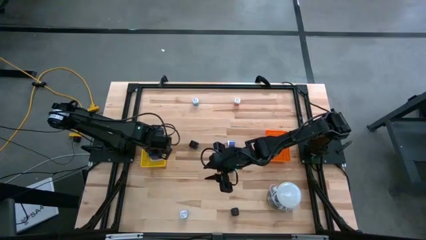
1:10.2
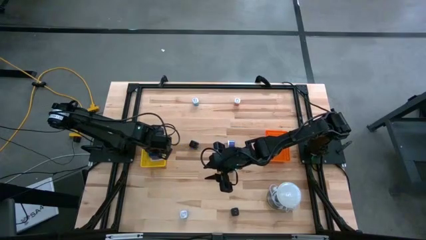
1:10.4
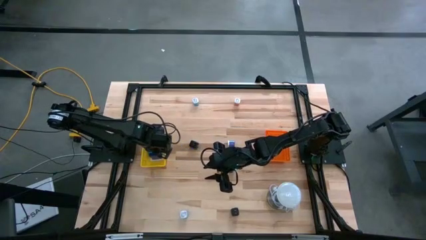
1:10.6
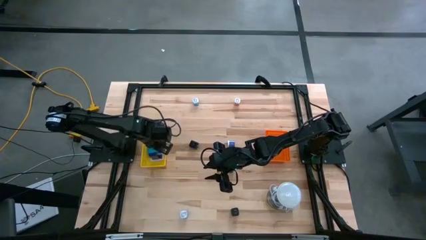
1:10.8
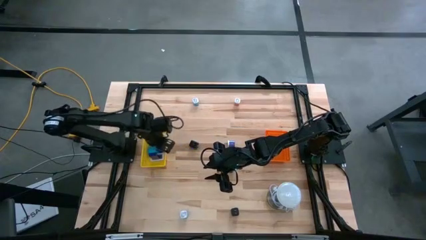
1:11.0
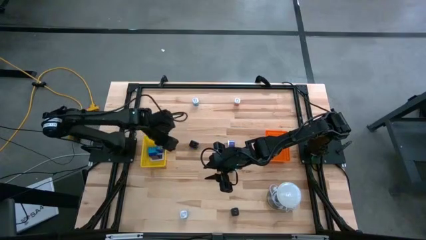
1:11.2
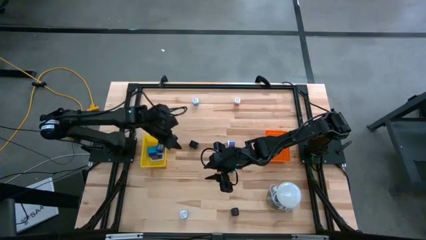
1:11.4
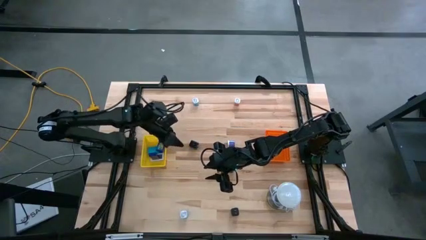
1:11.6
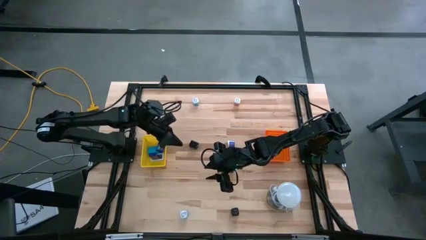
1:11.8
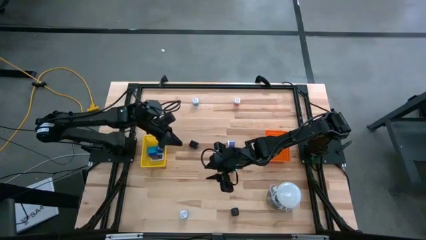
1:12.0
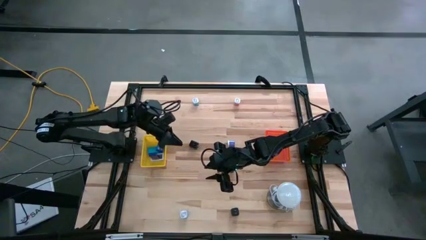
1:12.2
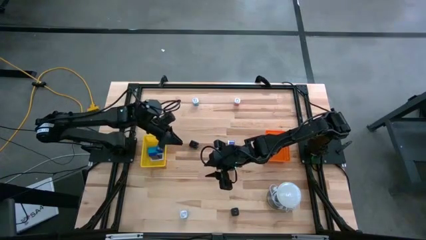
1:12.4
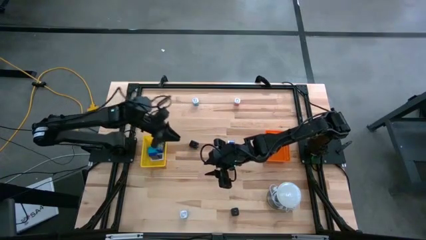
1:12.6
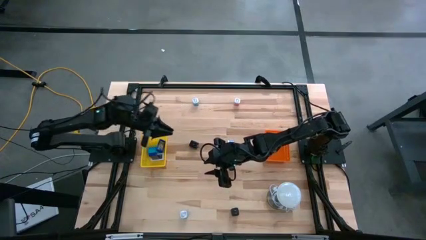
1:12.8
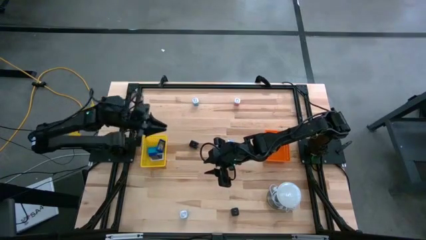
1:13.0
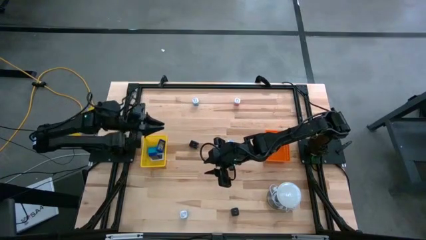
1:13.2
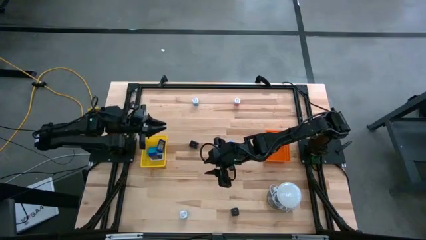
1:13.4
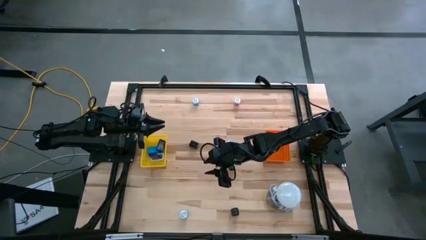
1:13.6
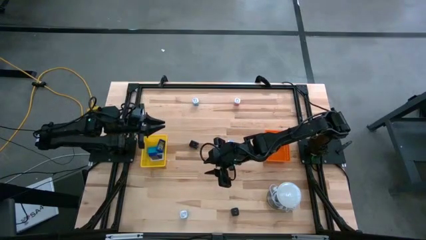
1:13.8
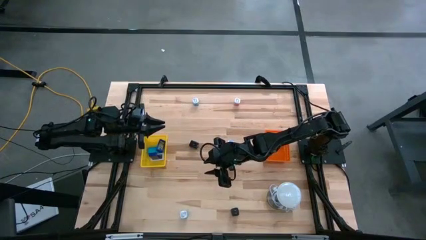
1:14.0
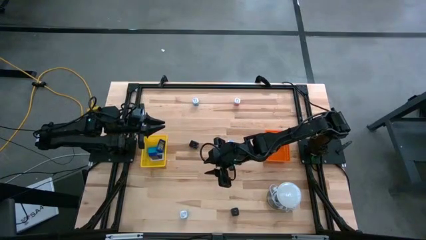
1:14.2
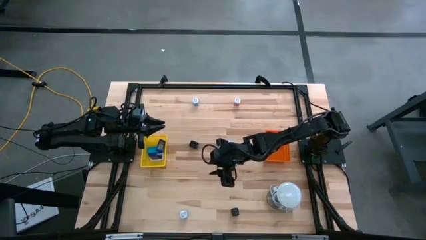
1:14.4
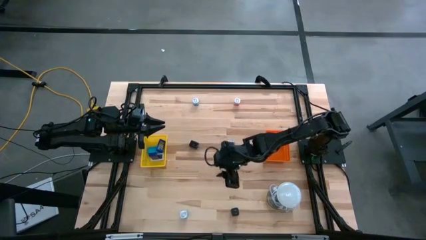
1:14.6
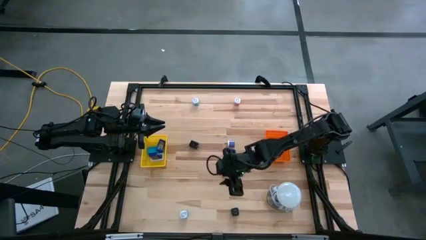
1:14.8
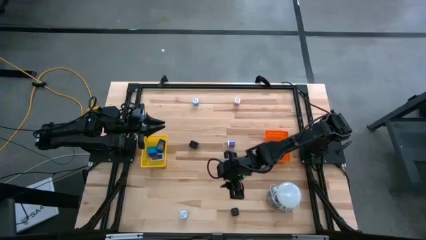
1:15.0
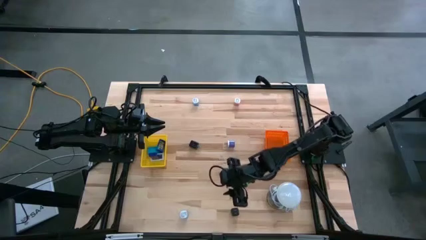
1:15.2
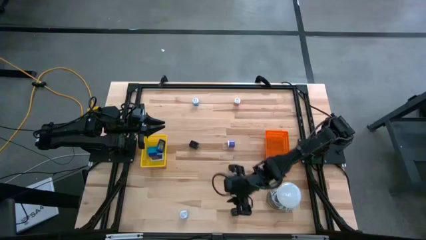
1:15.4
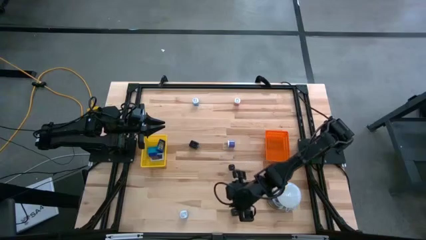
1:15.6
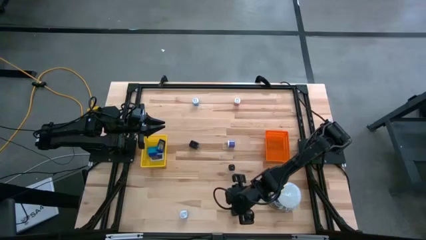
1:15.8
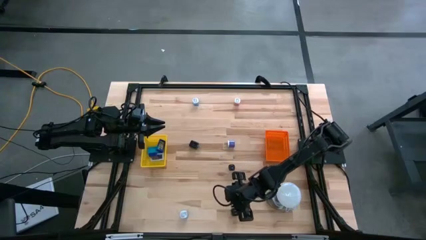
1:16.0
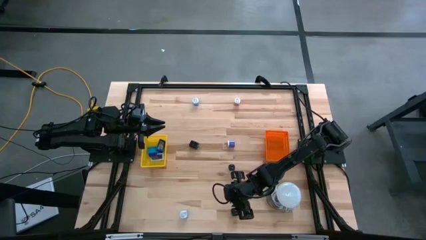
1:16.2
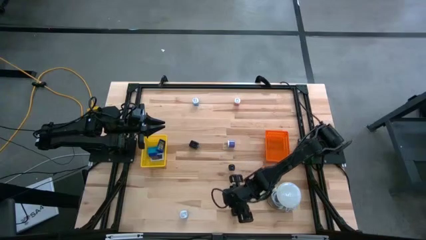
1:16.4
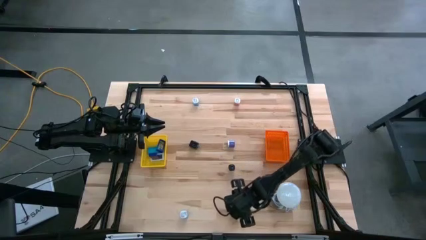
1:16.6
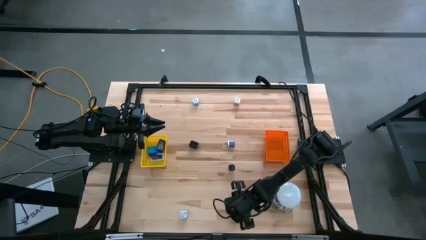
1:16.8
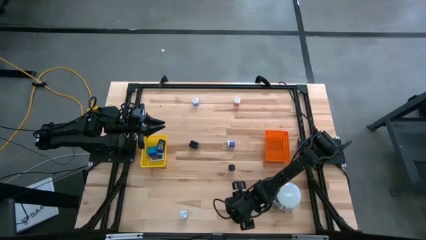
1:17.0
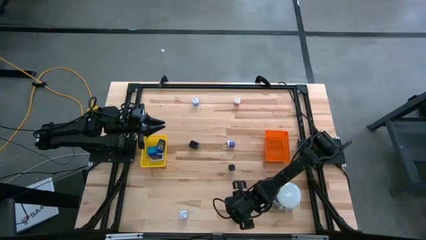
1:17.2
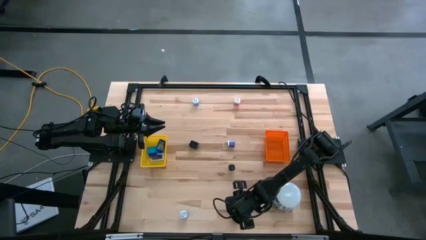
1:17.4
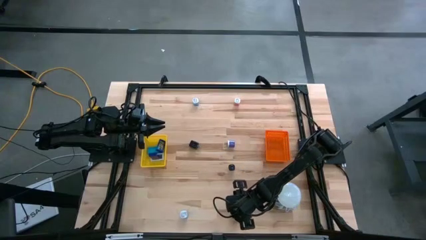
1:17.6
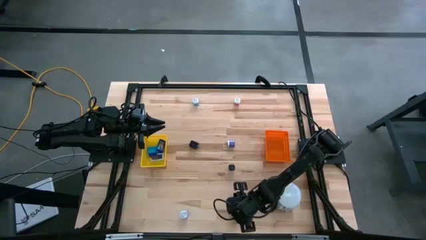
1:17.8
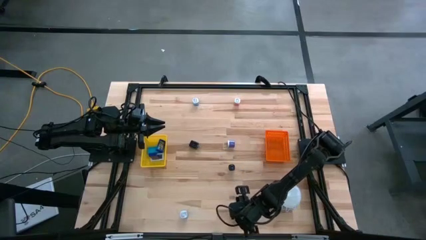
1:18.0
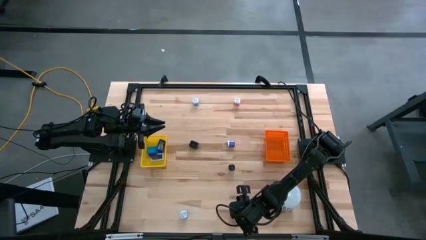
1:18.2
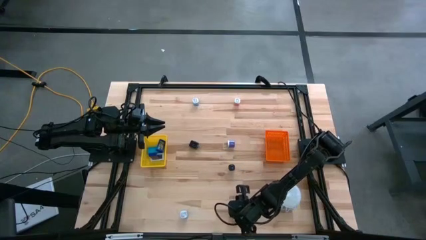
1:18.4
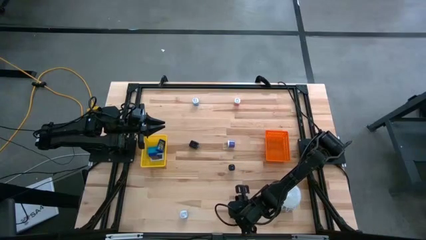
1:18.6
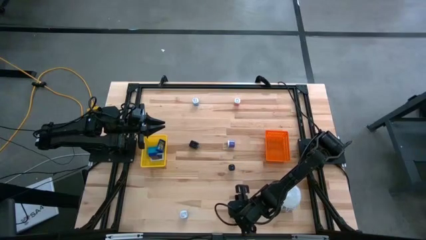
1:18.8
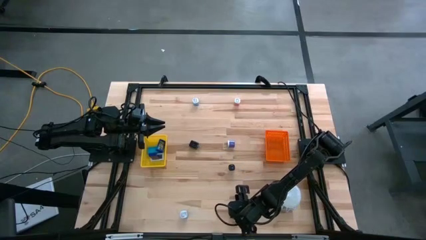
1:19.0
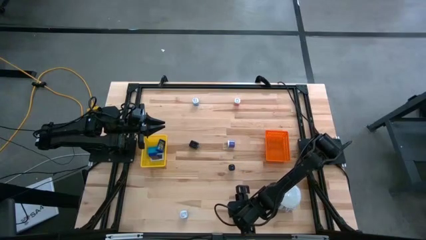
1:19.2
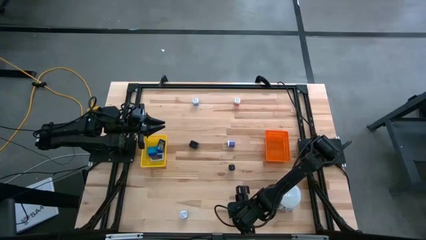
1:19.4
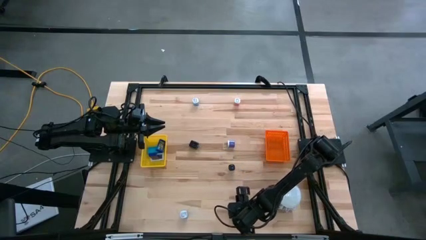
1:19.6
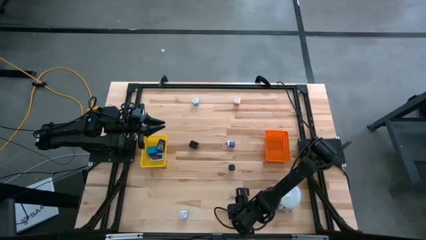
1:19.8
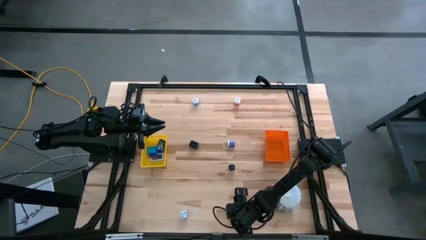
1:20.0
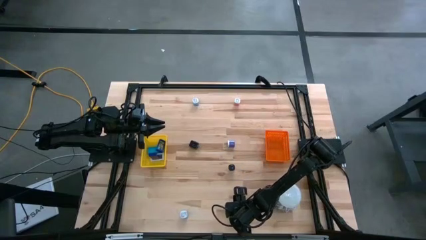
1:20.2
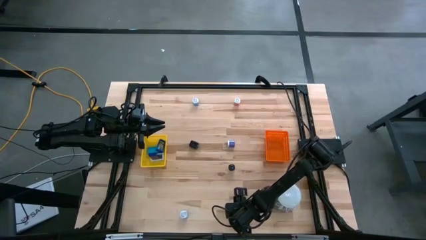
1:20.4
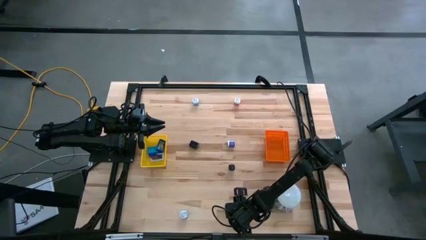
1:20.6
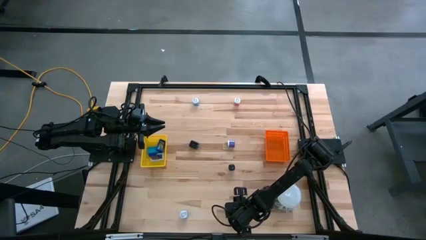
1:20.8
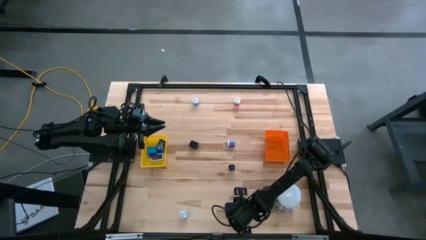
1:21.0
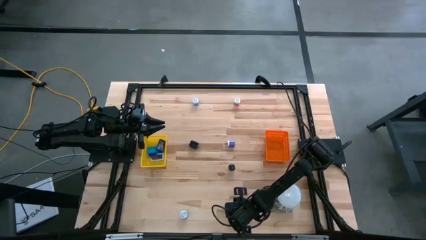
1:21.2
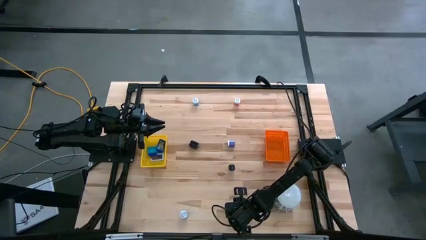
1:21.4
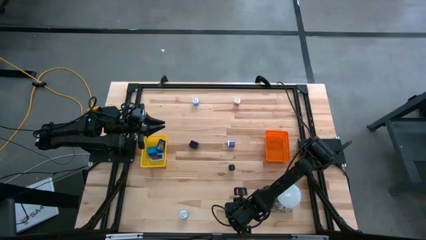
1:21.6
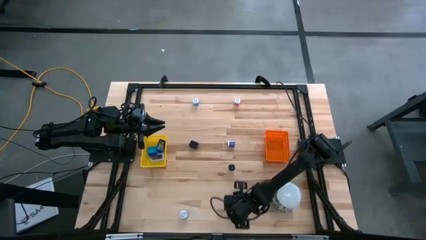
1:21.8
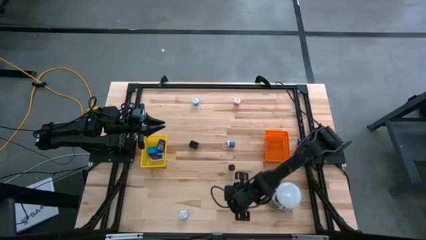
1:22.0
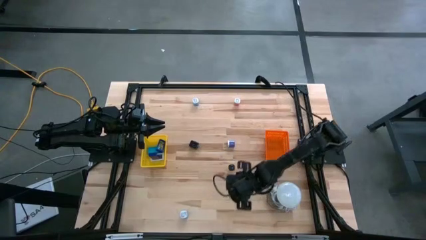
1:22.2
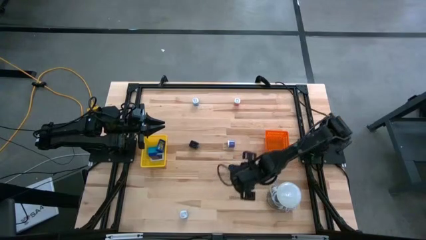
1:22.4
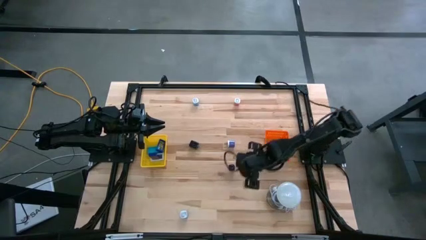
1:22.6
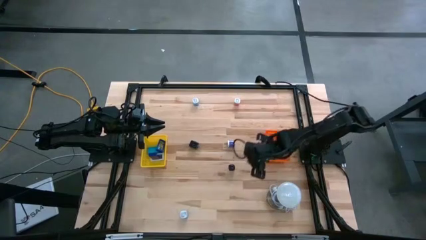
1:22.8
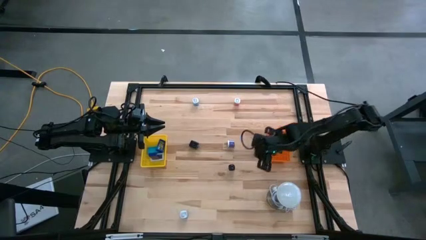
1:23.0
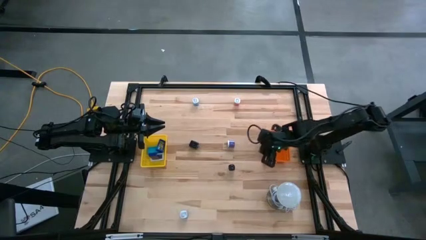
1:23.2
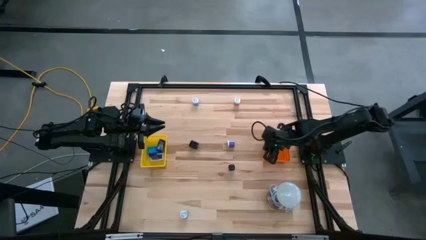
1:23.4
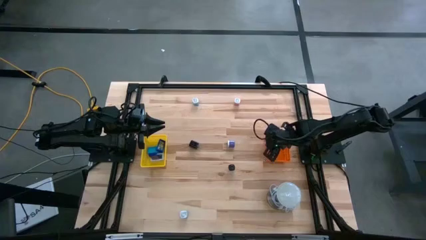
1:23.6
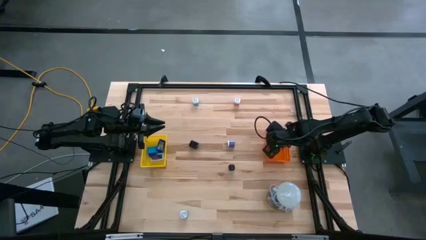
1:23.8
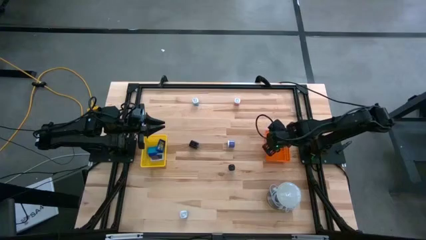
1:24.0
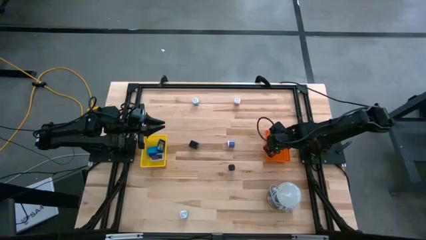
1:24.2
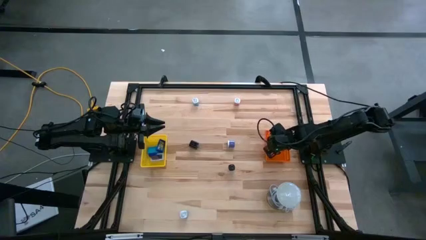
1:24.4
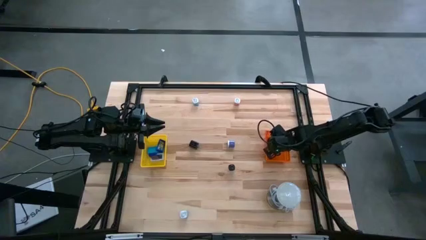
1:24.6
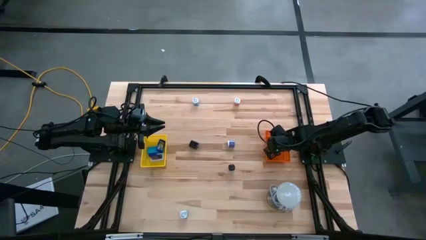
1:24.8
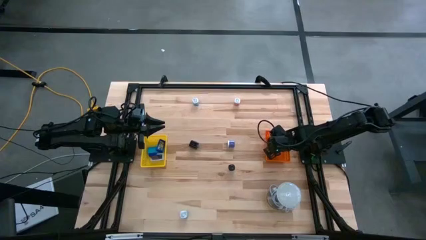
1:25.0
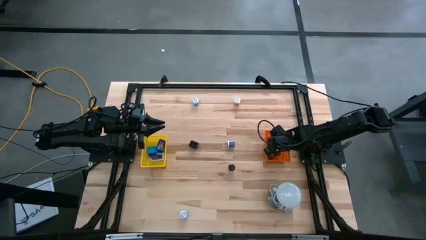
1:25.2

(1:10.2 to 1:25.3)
Task: Pick & Place Office items
Put the bottom black charger adapter into the orange bin
